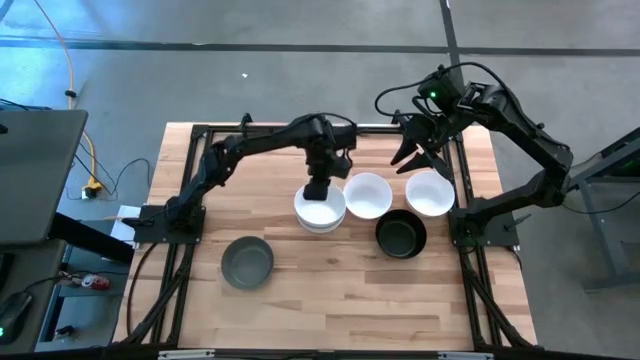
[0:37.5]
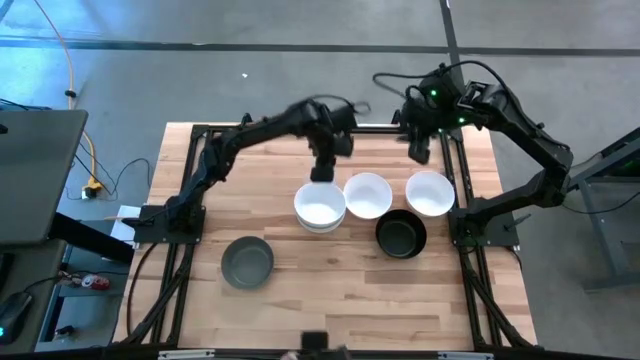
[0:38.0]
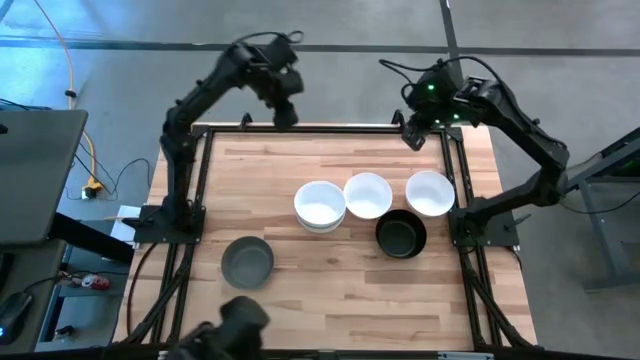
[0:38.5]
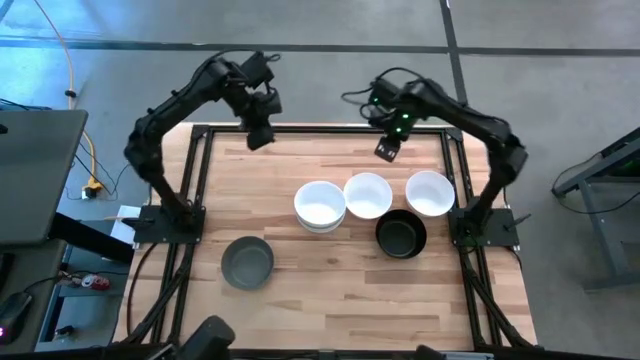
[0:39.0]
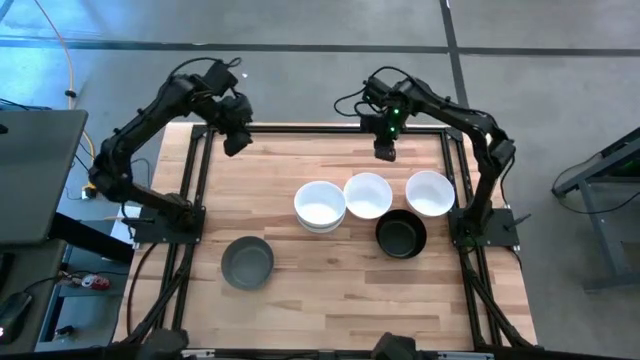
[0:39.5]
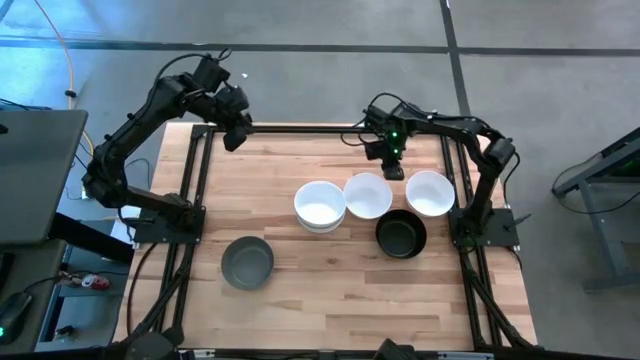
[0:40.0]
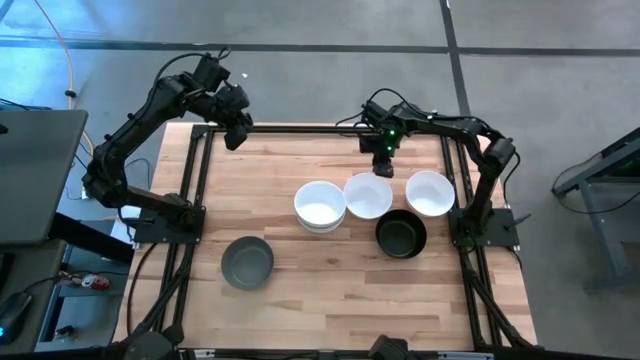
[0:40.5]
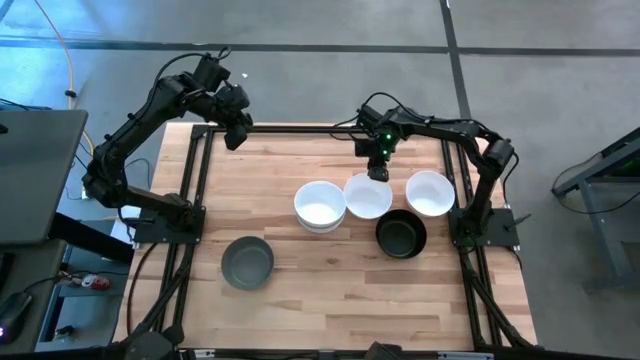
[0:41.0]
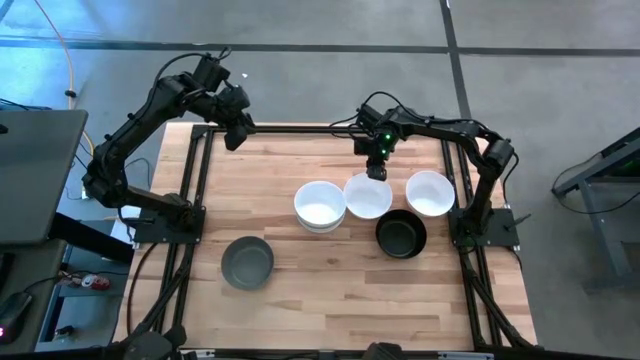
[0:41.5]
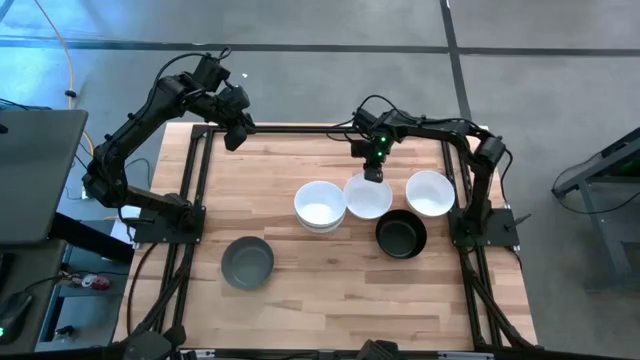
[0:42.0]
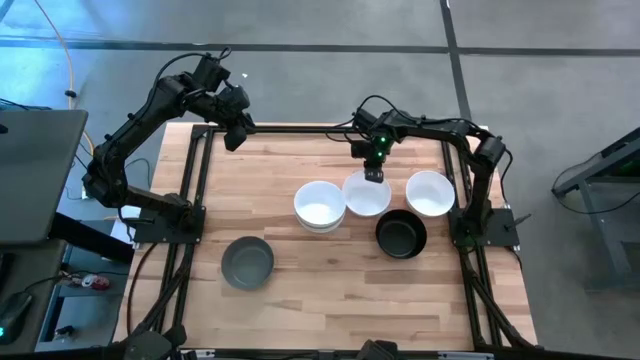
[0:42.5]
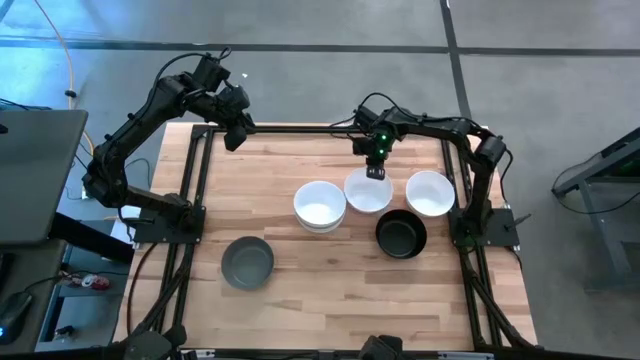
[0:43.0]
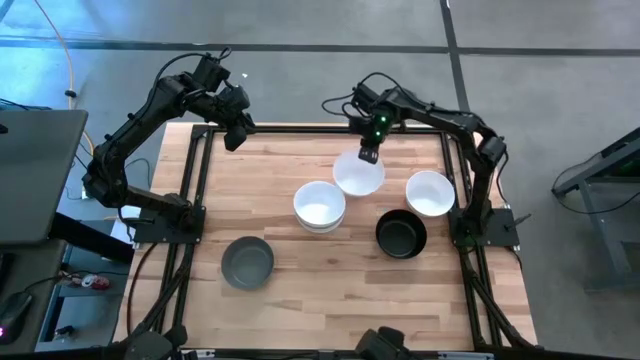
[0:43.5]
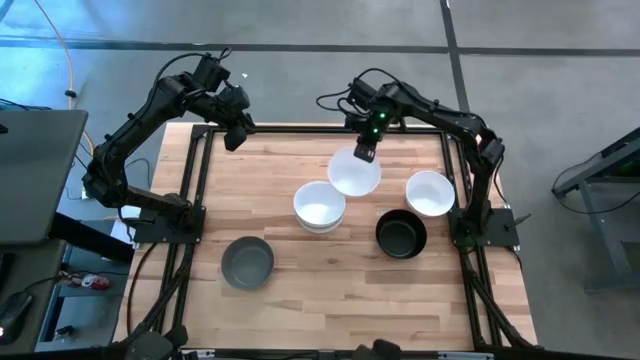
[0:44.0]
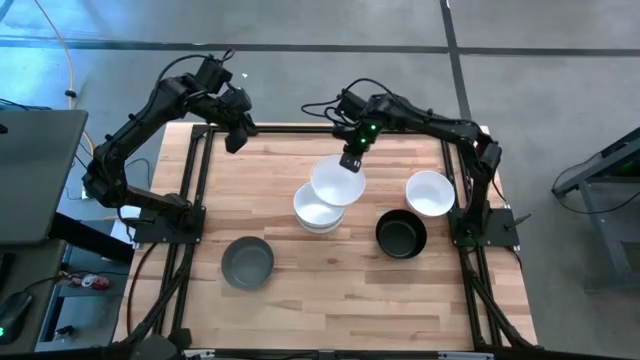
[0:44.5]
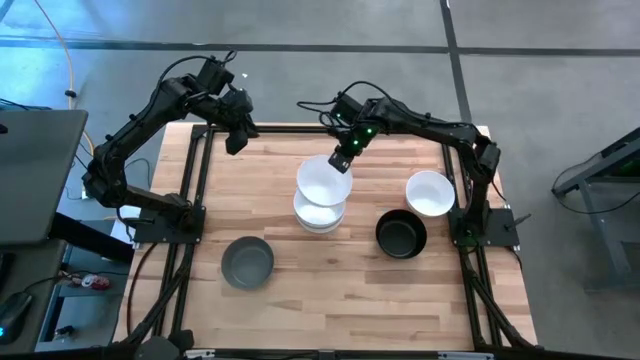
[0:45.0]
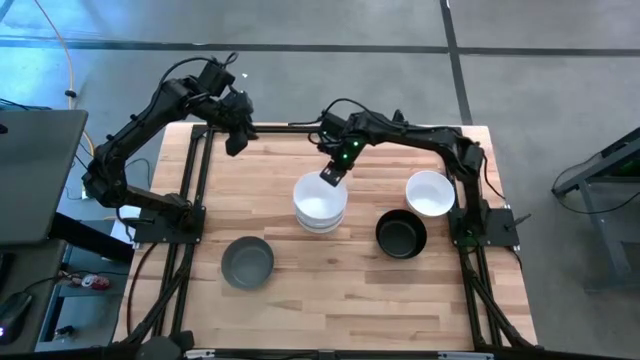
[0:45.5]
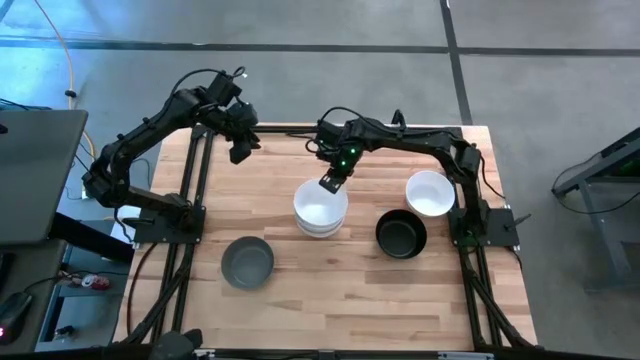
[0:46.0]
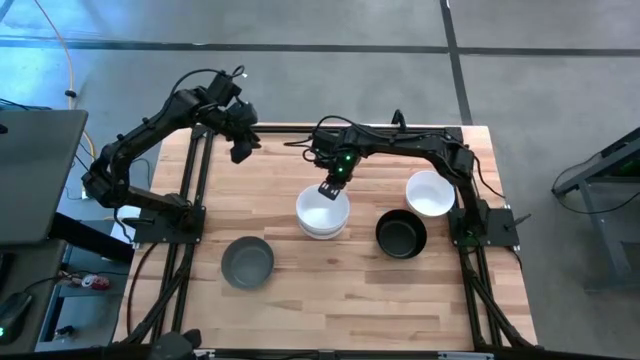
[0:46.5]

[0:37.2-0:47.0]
Task: Nest bowls inside each other
Stack the white bowl on top of the white bowl

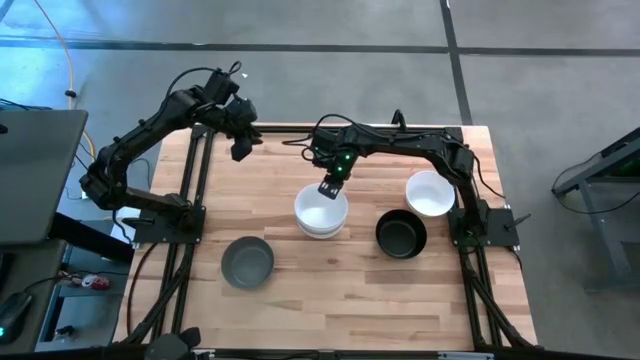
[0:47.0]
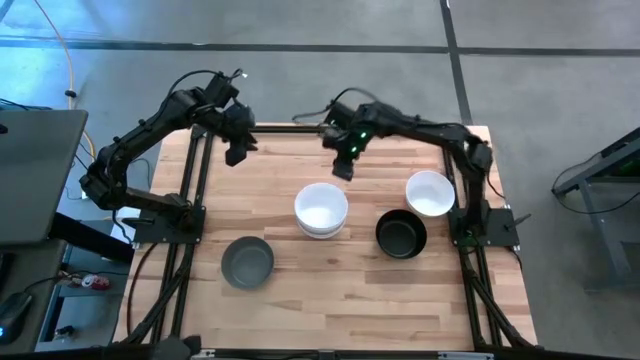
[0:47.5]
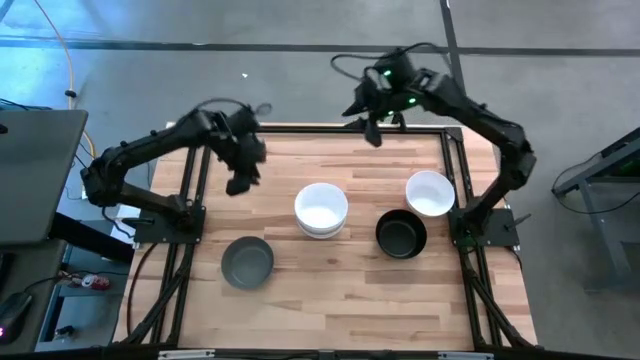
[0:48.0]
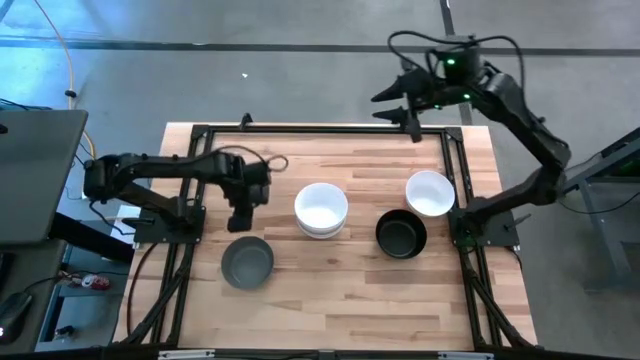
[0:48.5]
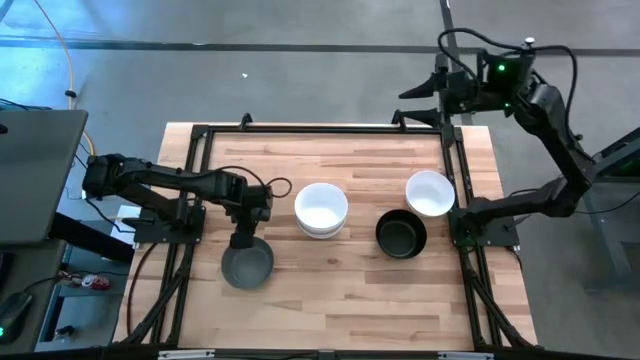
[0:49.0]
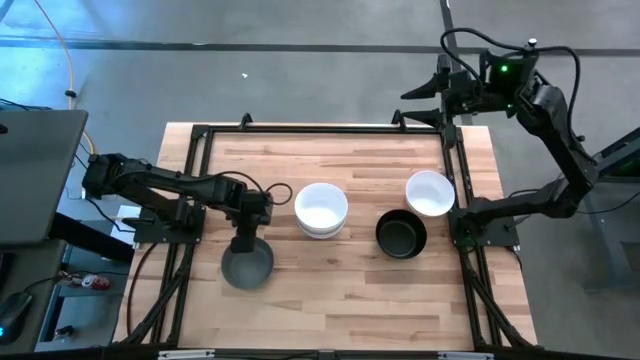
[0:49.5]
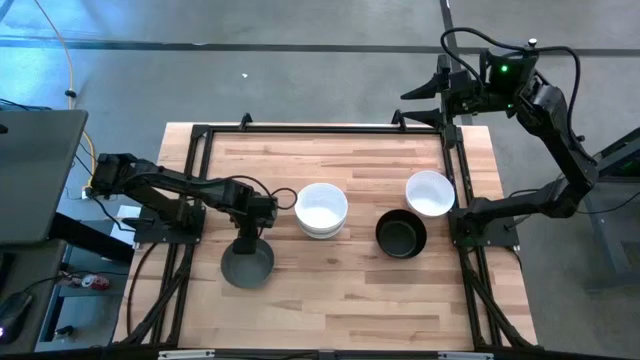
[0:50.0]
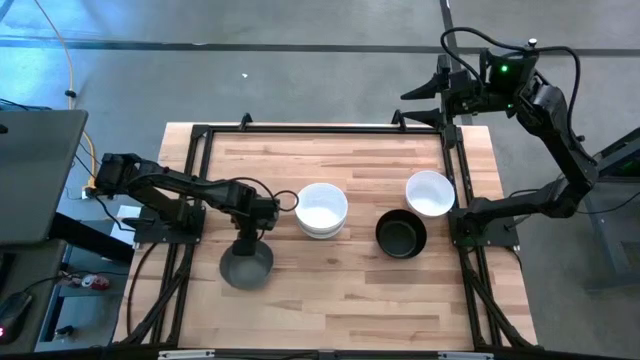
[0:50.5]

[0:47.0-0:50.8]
Stack the dark gray bowl on top of the white bowl

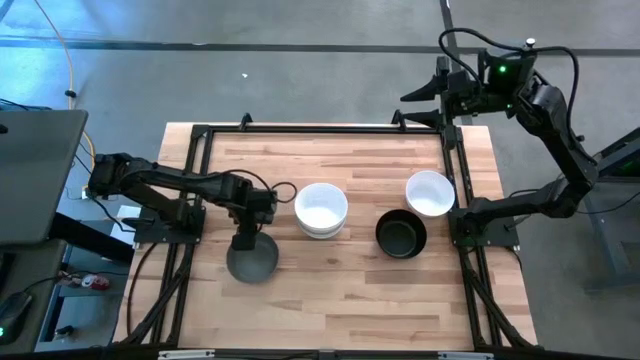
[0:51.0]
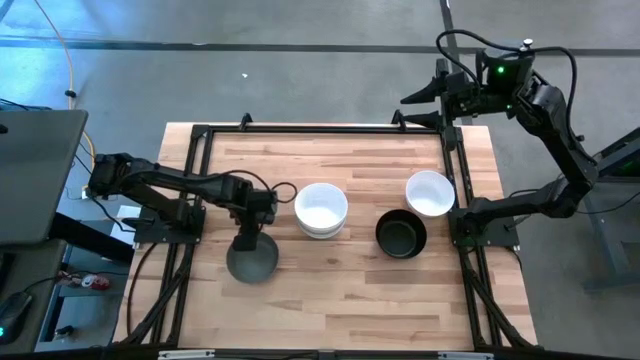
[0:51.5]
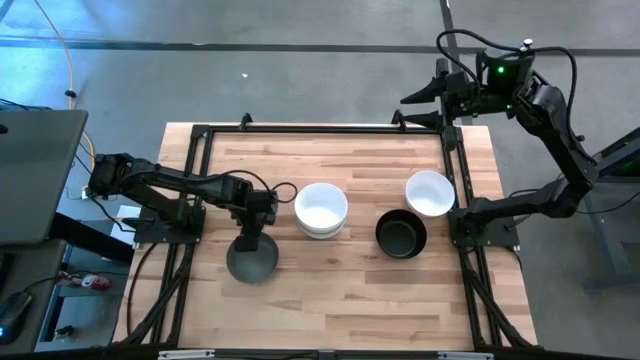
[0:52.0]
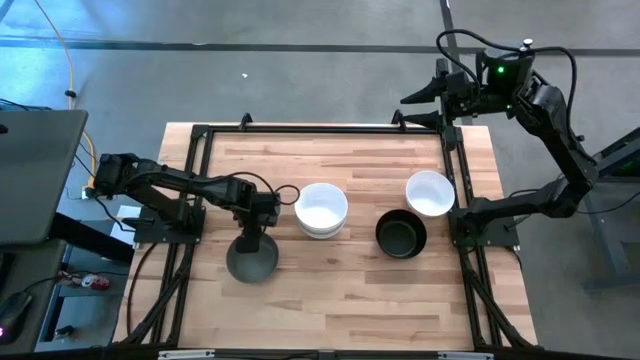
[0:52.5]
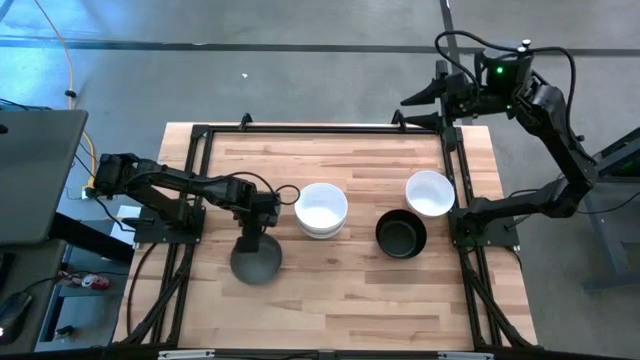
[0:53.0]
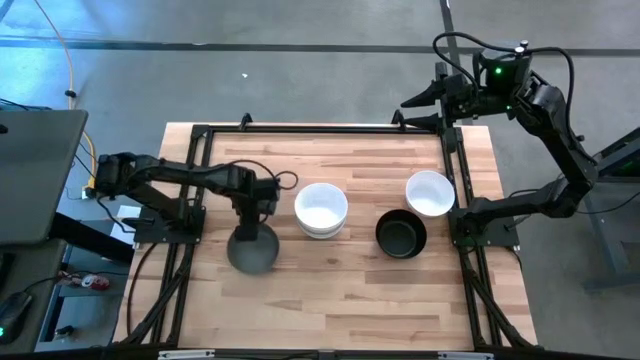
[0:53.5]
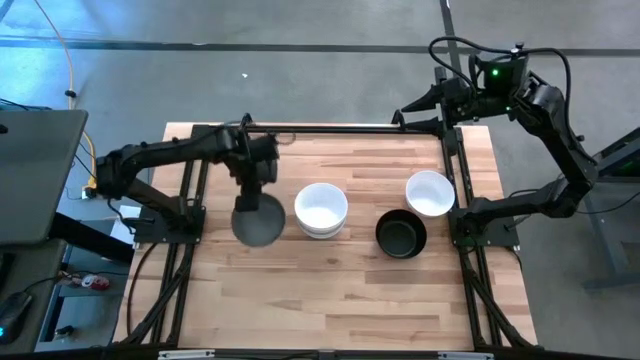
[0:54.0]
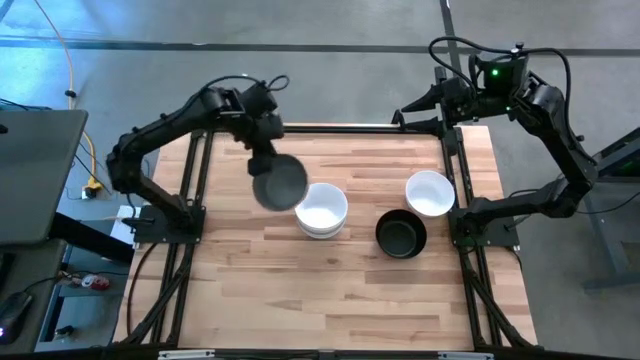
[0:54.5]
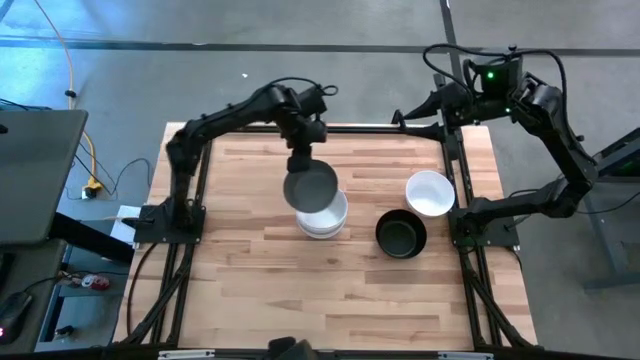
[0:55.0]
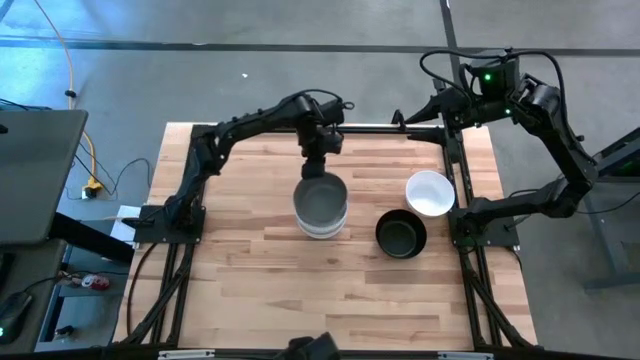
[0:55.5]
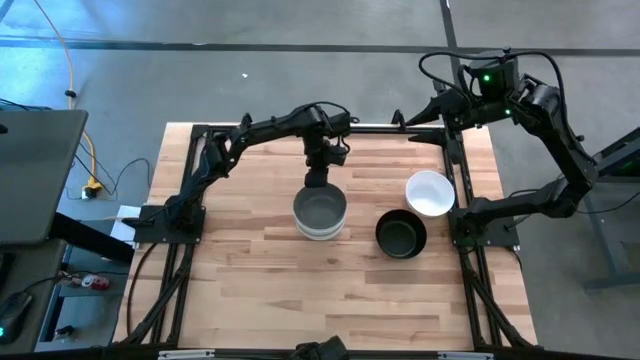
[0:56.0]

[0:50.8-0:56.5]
Stack the dark gray bowl on top of the white bowl

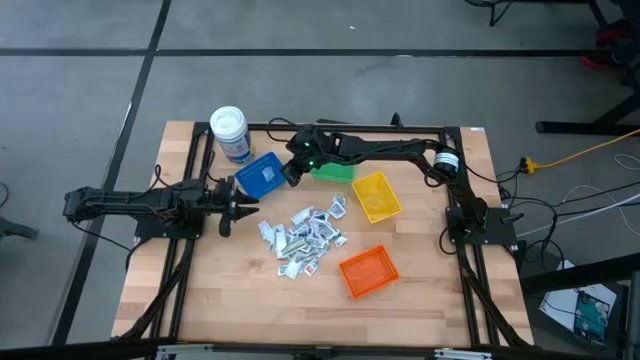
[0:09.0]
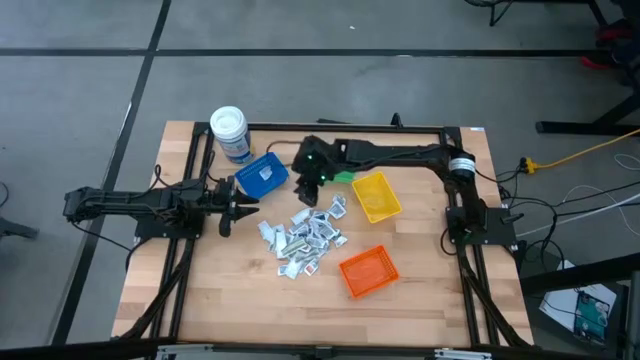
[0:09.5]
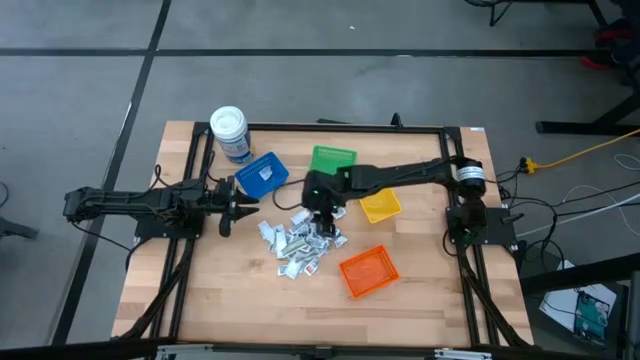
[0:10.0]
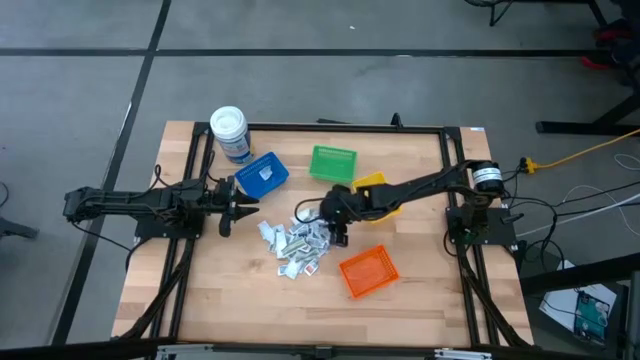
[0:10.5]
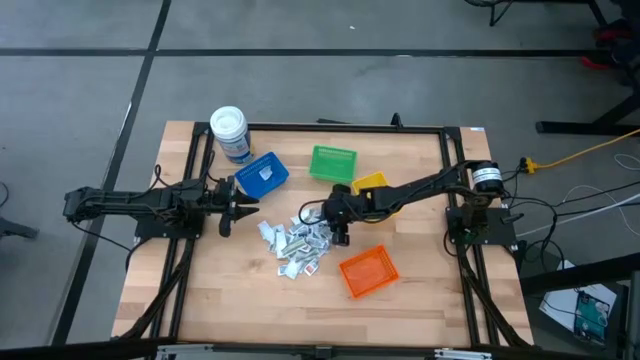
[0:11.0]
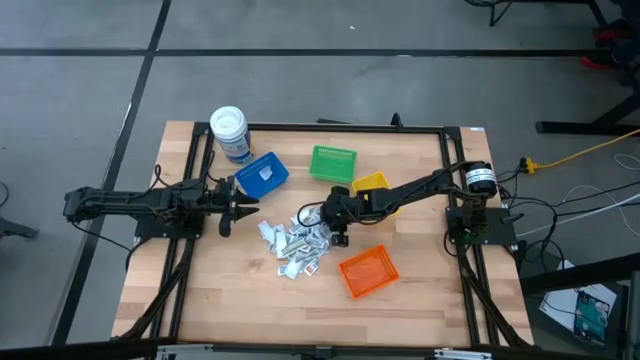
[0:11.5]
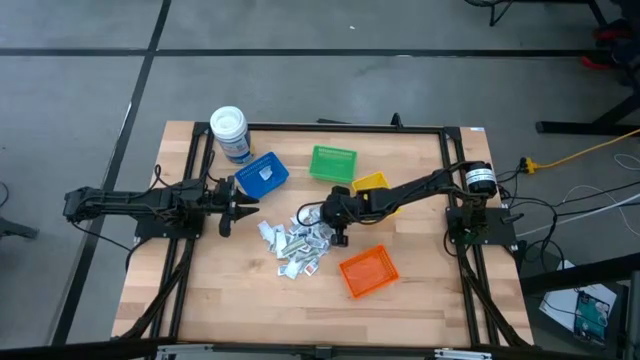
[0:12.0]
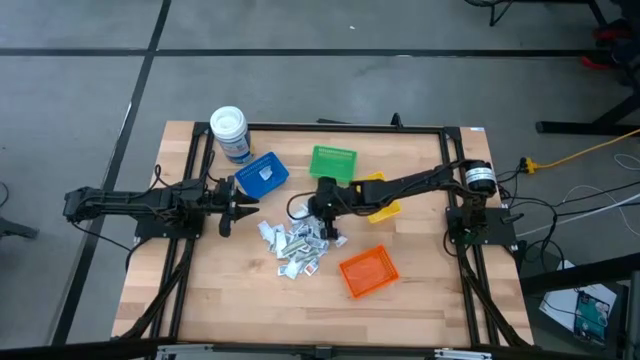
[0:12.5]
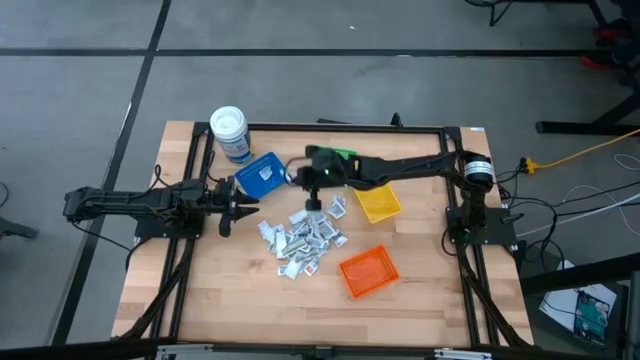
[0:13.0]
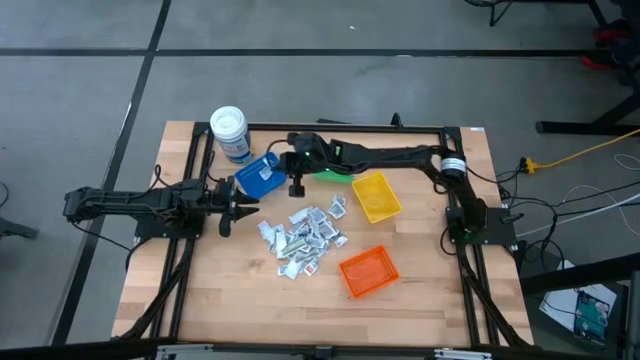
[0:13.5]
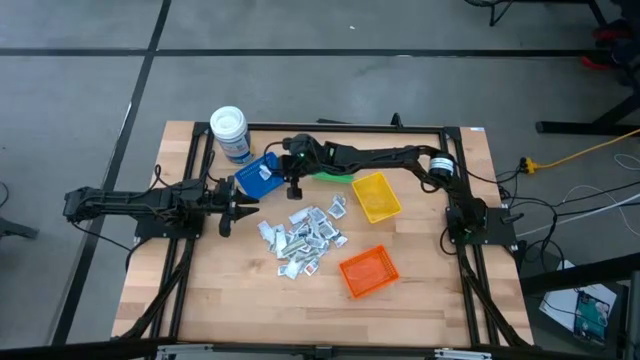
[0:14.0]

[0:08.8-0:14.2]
Task: Pick & Place First Aid Supplies
Put the white alcohol pad into the blue bin
